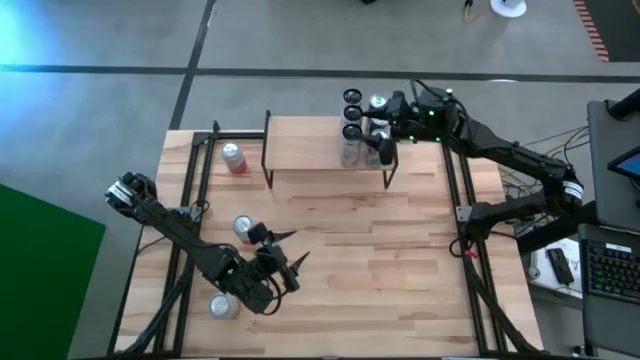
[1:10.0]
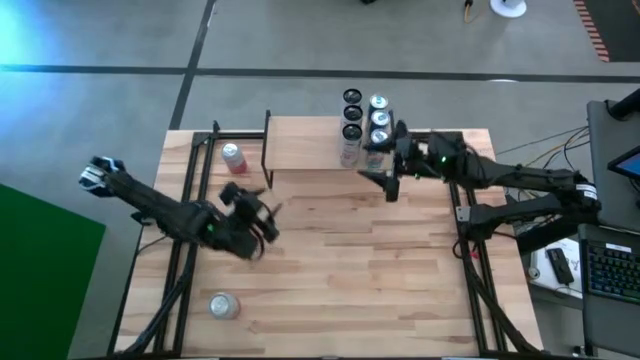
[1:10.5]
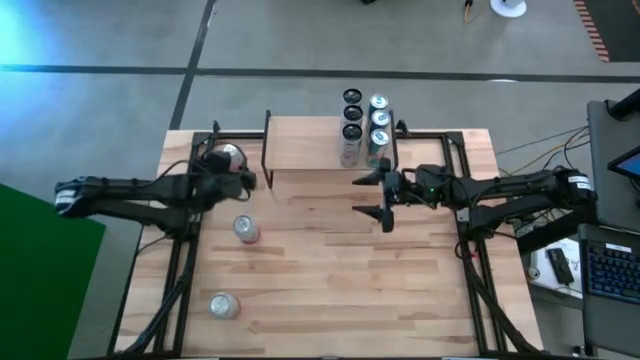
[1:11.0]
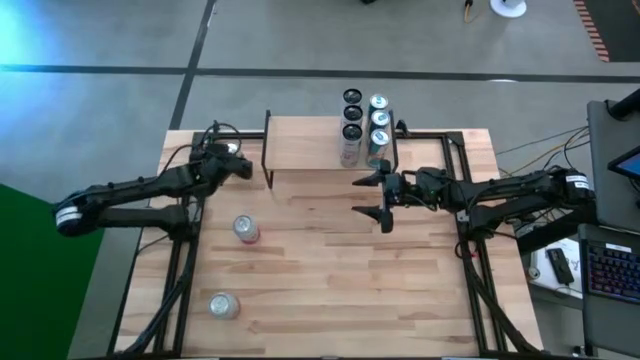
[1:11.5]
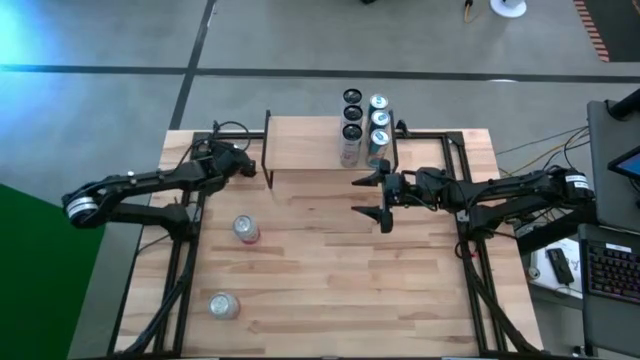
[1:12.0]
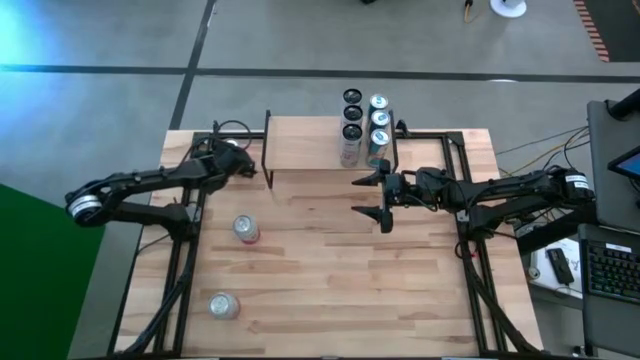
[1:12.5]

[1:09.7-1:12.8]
Task: Place canned beverage on shelf
Put the top pink white soda can on the shelf

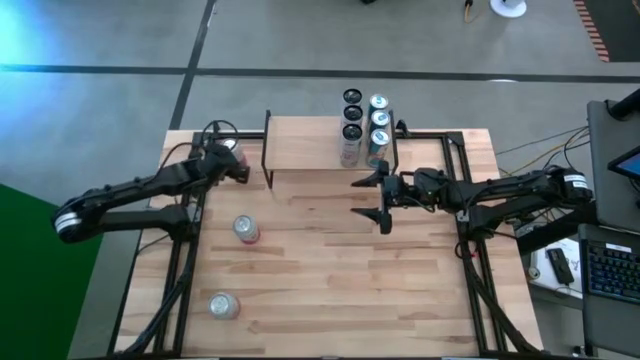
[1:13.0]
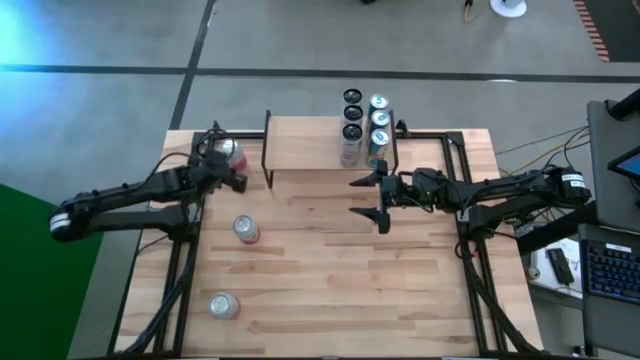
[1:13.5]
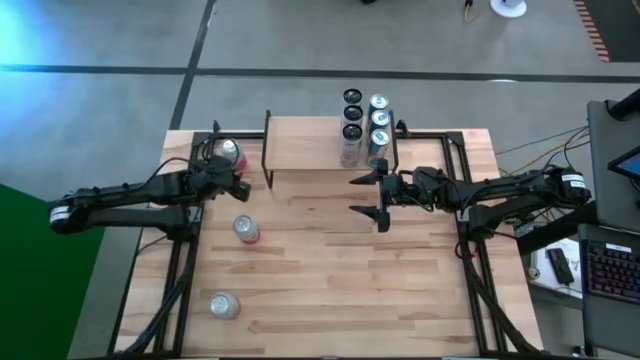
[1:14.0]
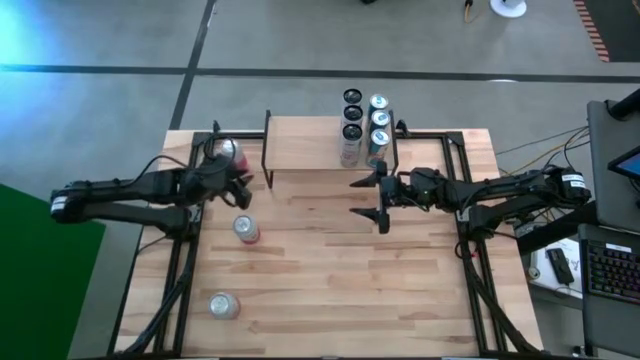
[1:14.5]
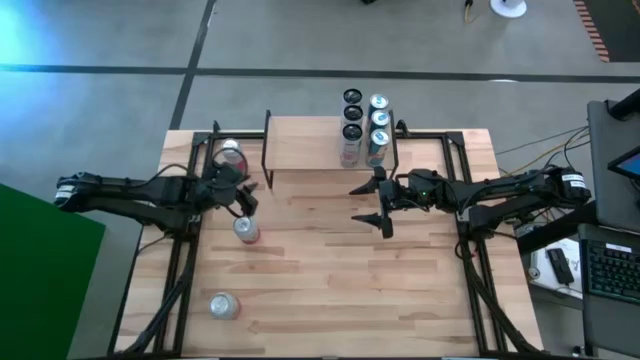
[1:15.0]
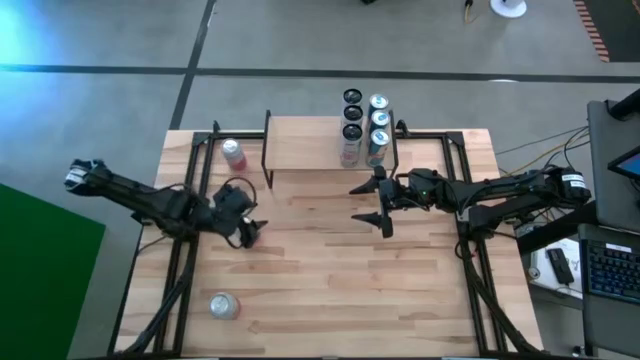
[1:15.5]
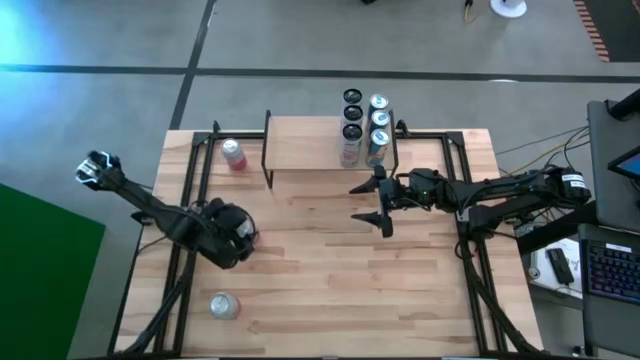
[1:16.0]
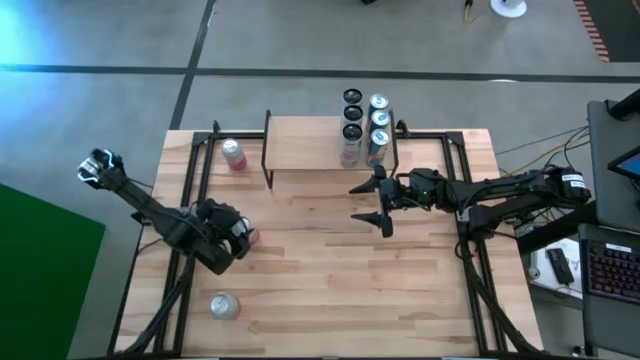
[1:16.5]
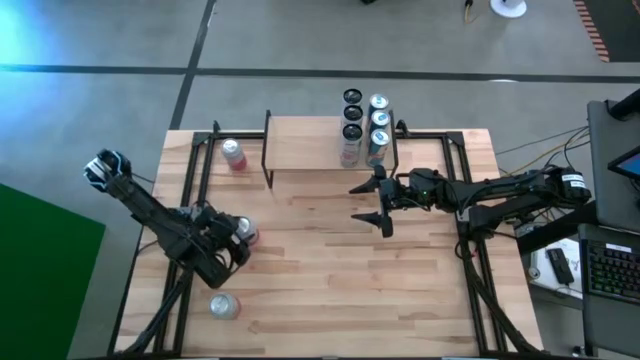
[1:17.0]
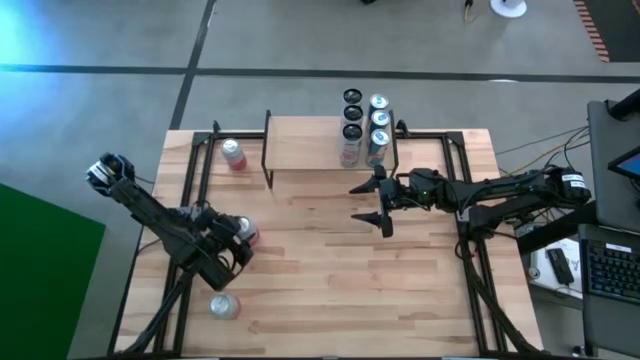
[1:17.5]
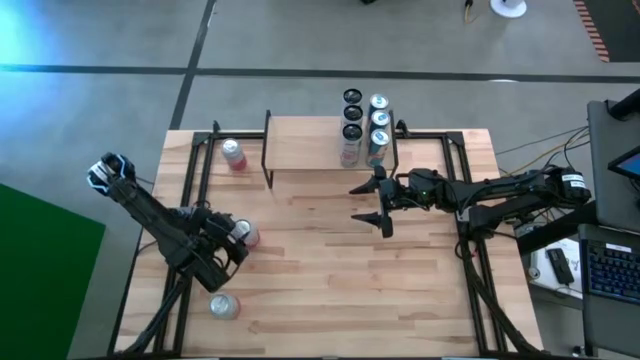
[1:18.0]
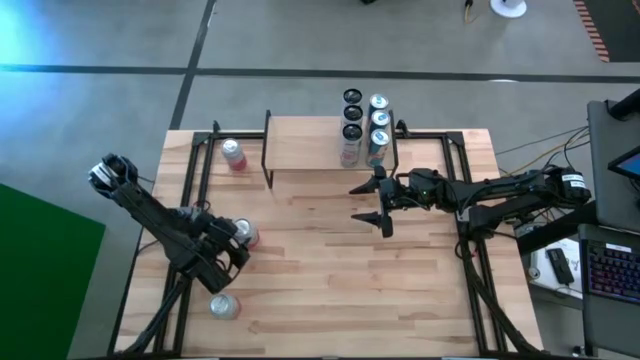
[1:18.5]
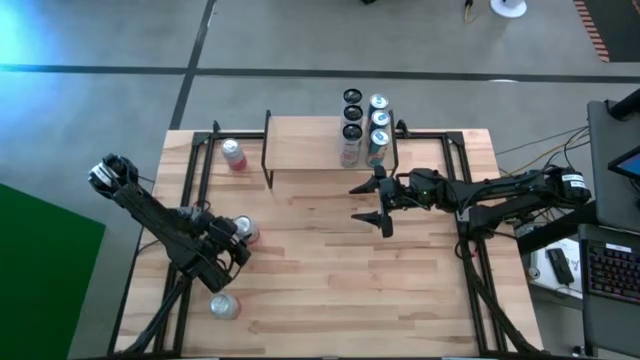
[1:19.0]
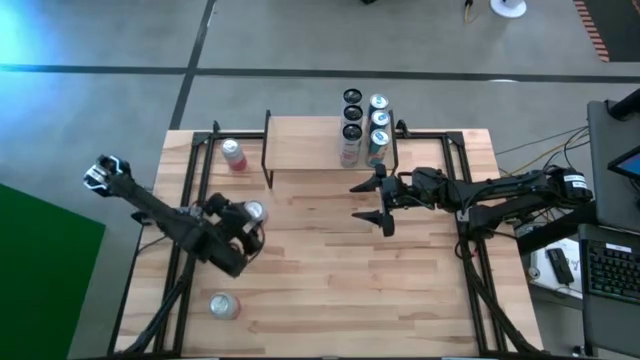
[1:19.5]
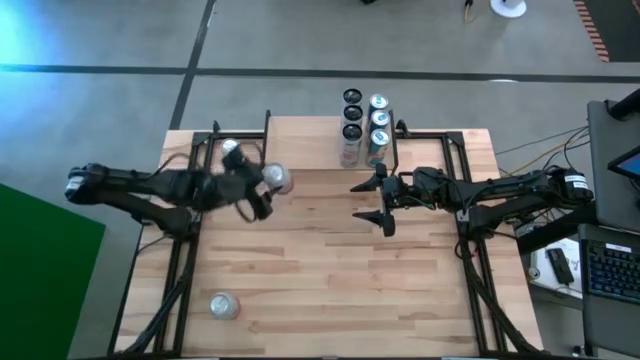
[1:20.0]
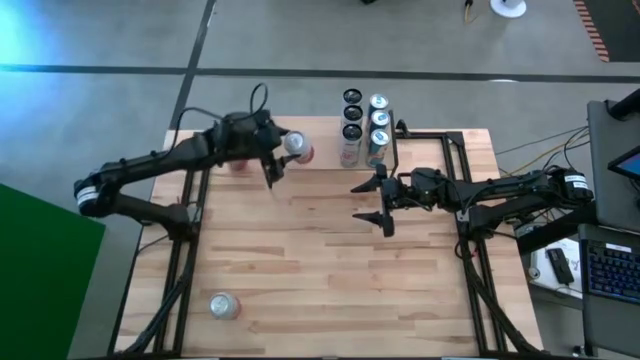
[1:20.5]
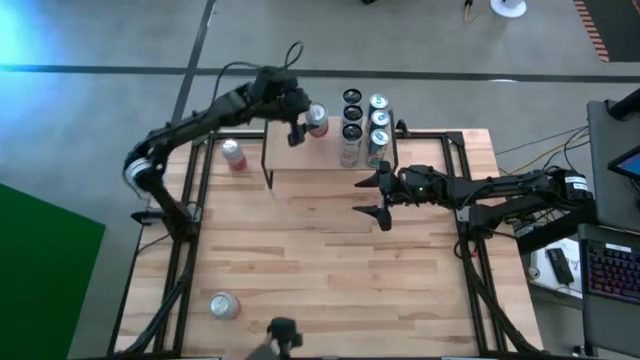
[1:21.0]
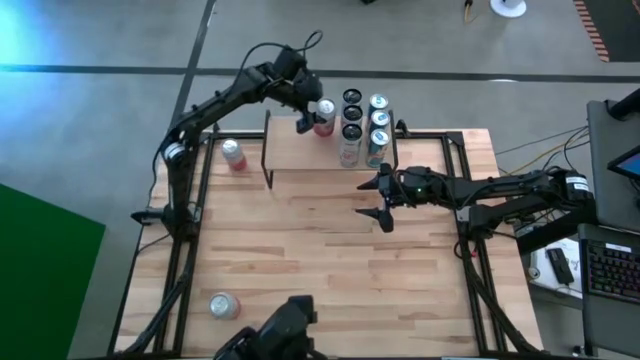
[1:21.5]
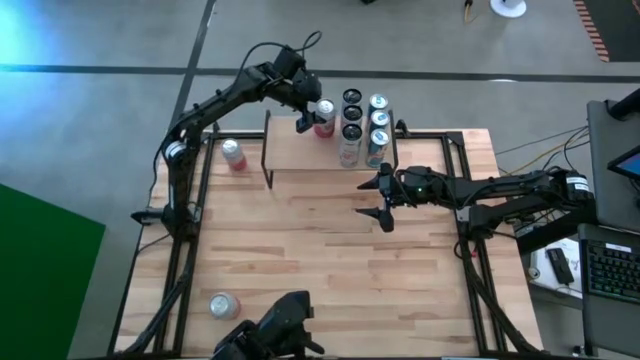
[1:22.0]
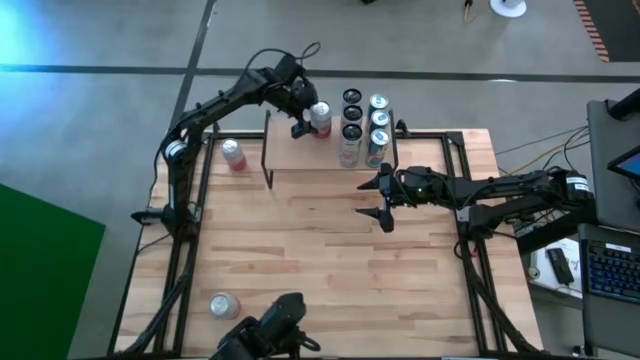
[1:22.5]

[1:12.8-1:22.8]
Put the middle pink white soda can on the shelf

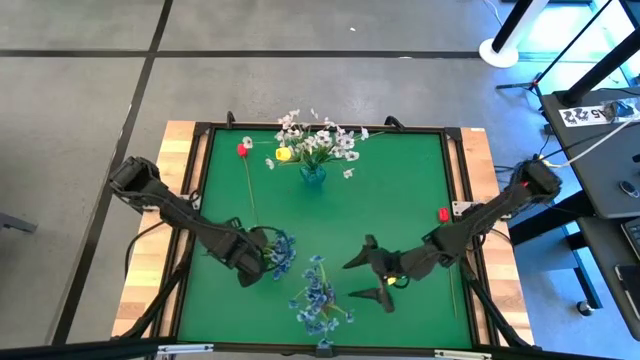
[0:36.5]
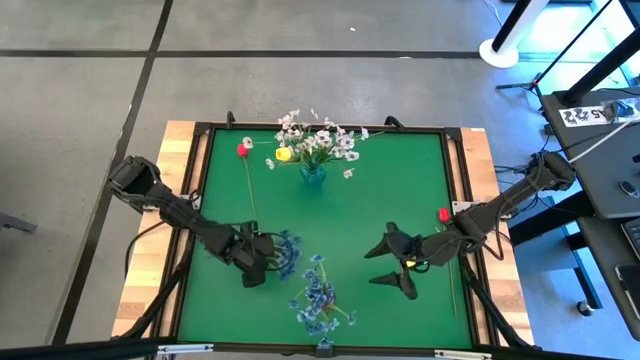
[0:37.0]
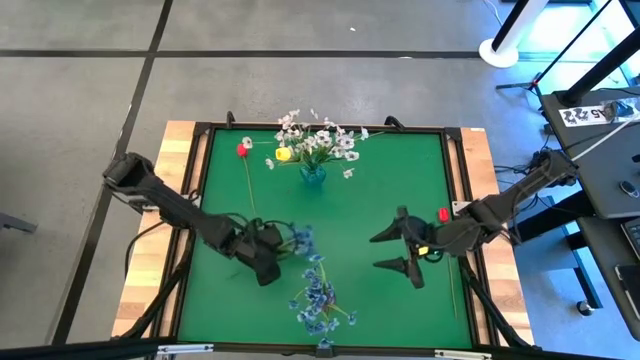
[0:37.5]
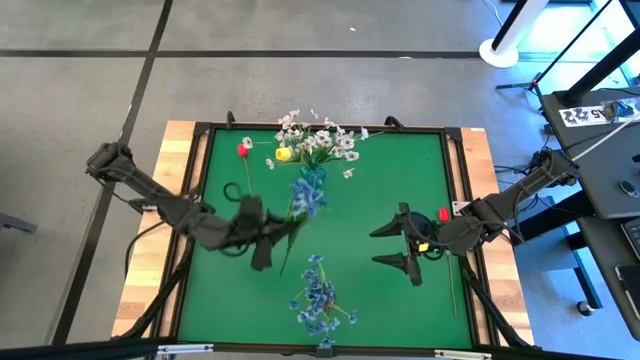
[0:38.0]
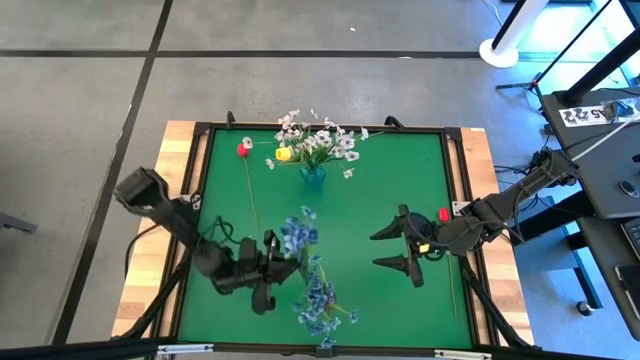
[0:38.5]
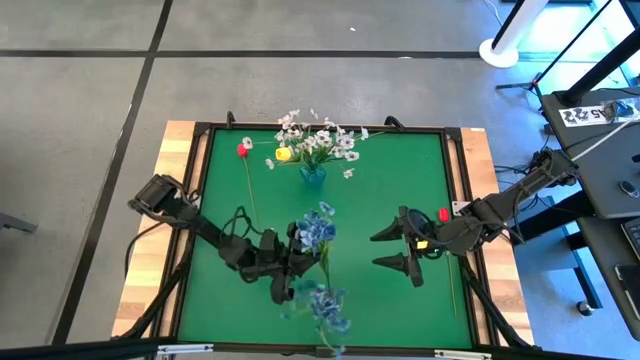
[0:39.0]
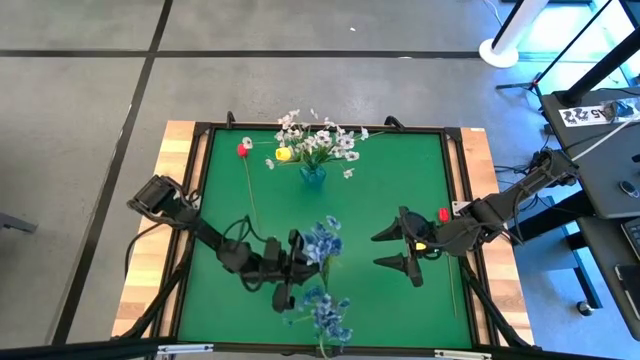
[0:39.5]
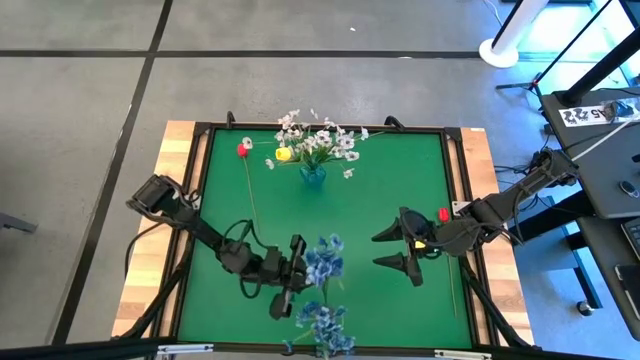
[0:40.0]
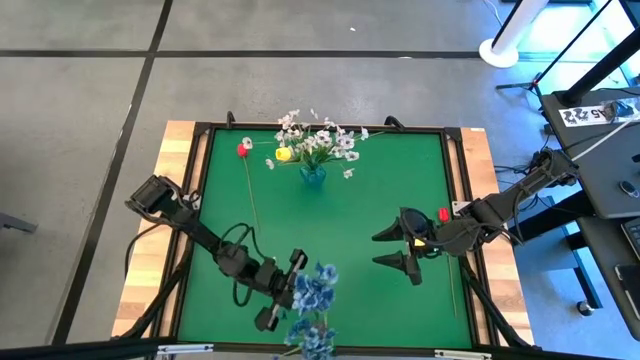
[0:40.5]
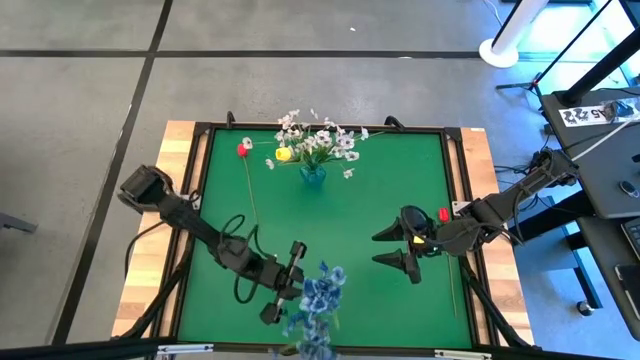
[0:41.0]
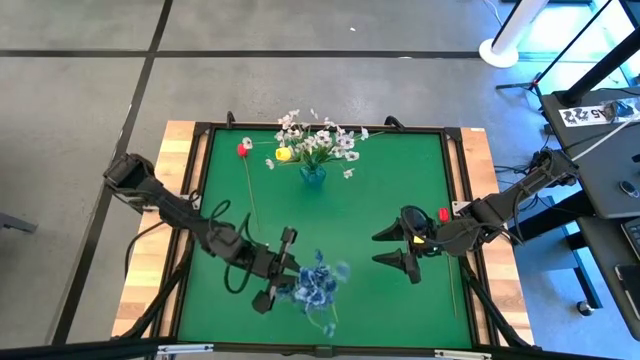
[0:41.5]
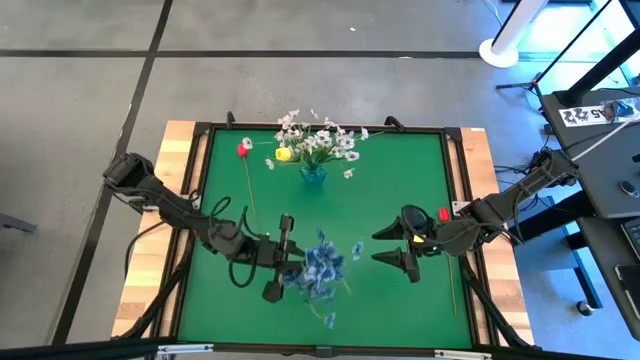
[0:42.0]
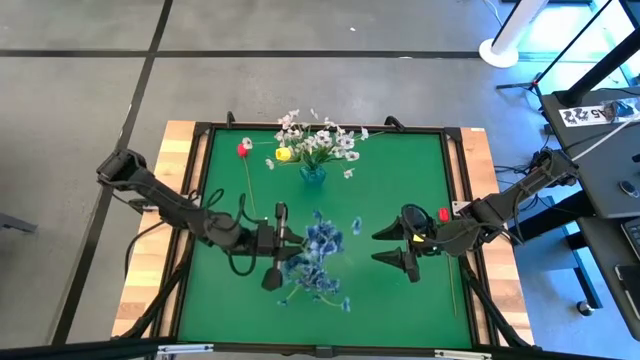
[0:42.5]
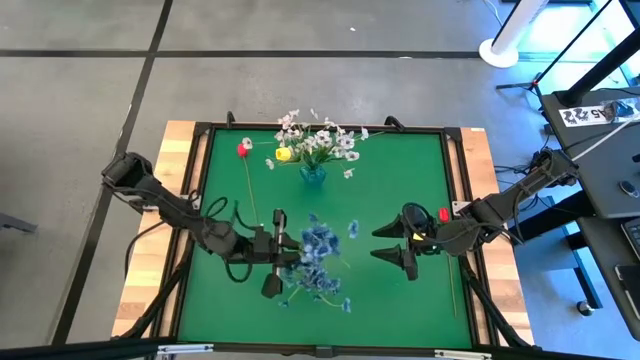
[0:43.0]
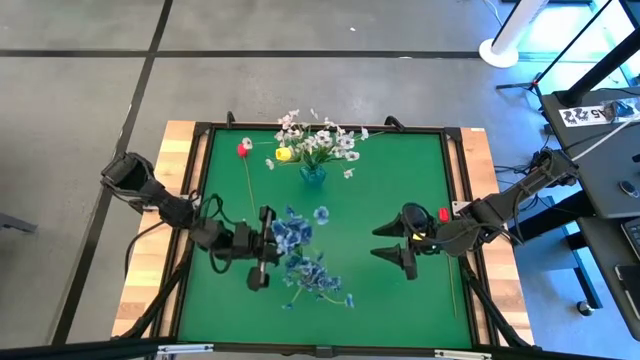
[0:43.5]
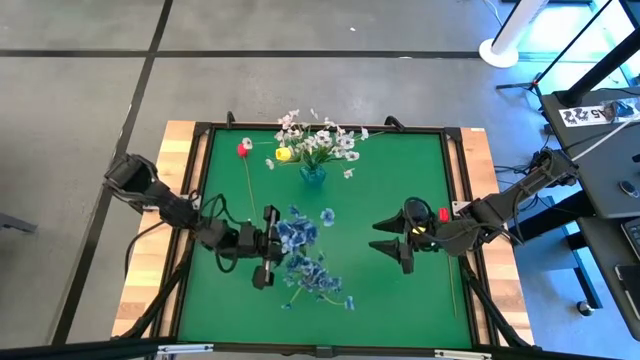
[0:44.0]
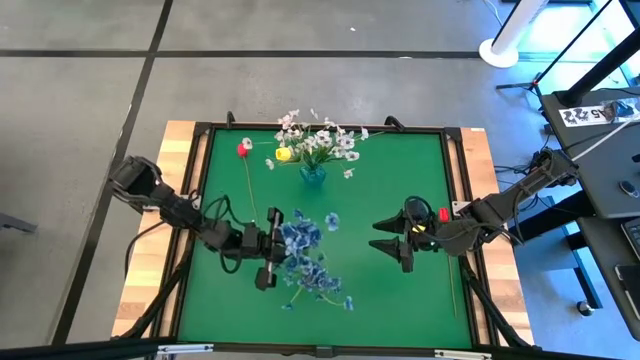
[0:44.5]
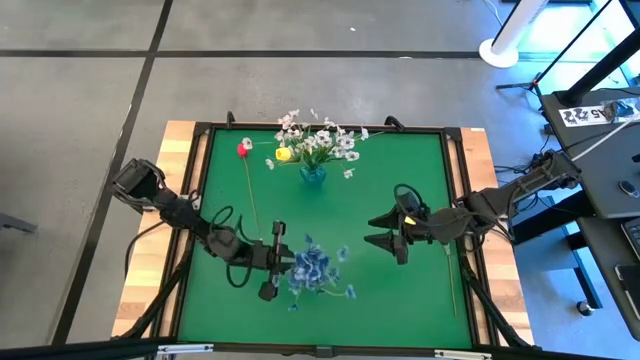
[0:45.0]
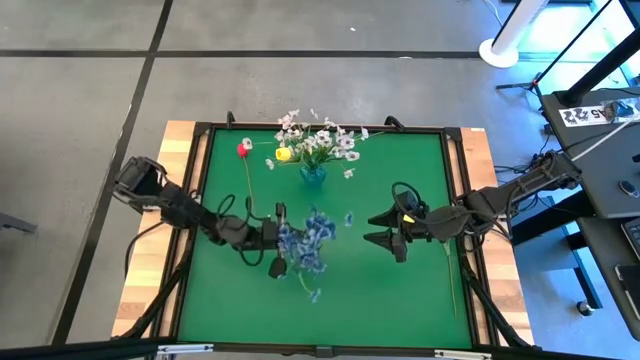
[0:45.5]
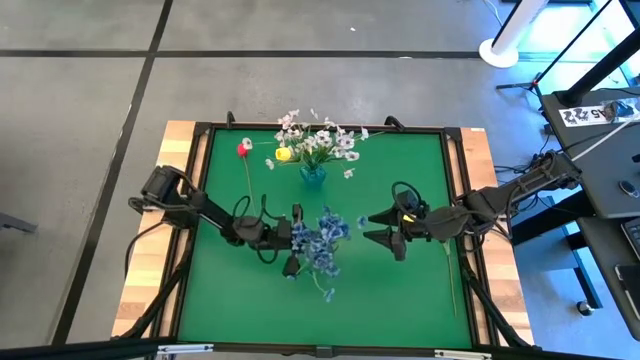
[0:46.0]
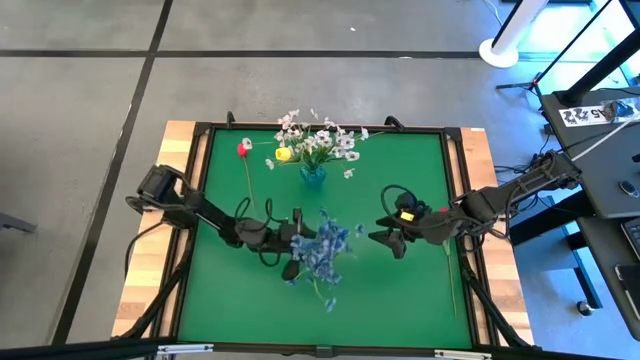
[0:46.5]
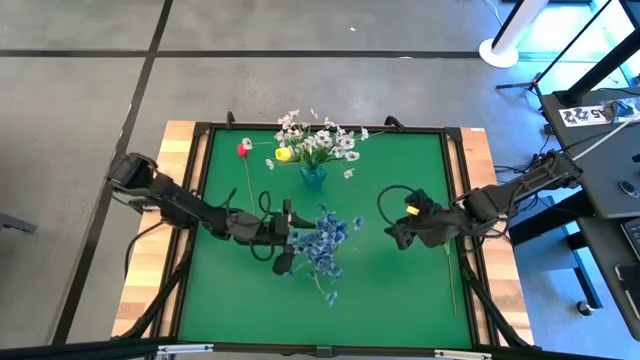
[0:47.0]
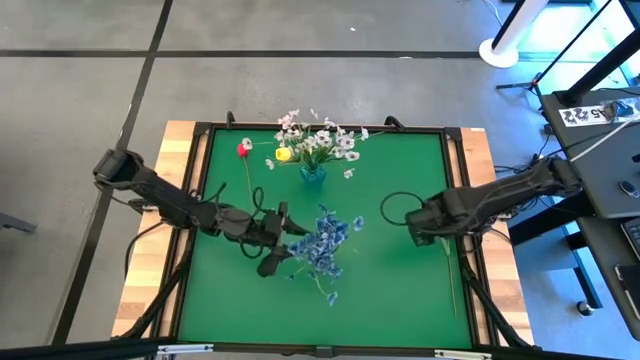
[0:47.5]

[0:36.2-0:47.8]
Task: Sort flowers into vase by color
Put the blue flowers into the violet vase
